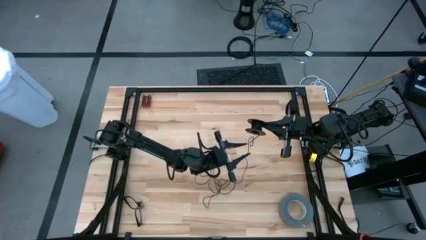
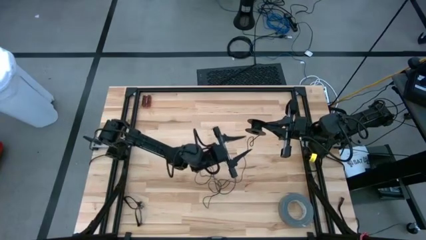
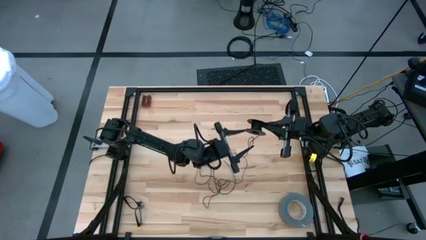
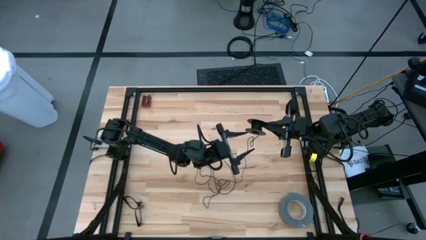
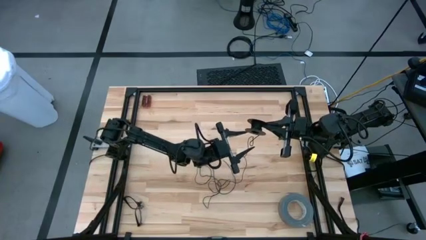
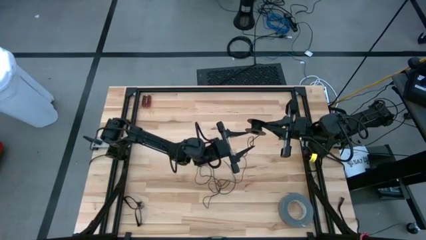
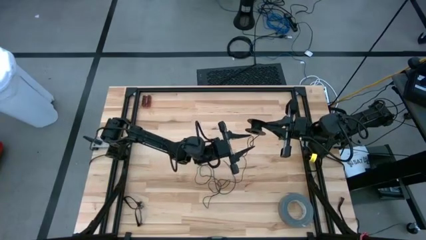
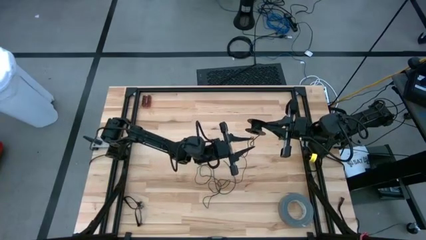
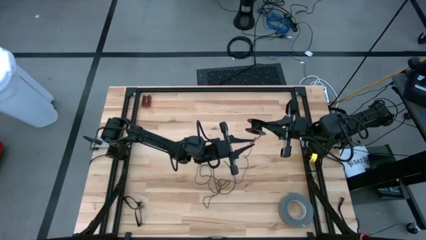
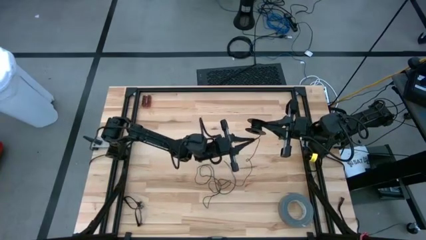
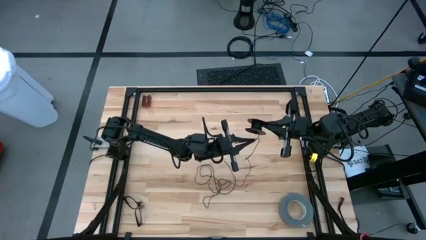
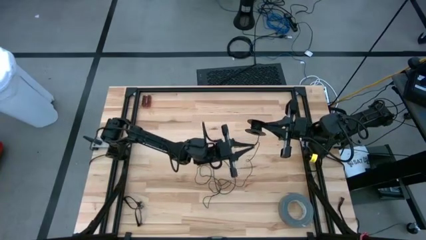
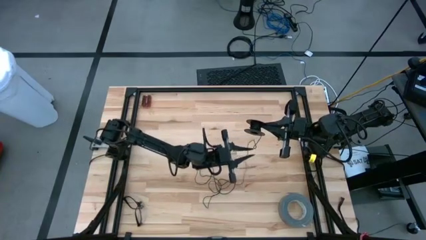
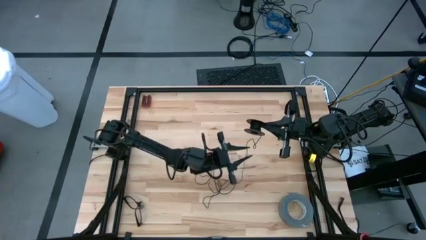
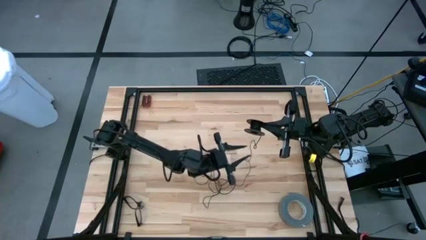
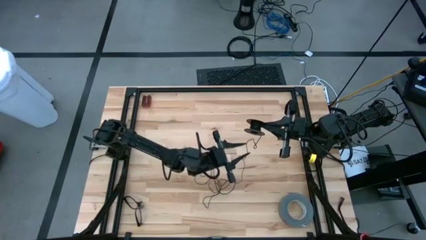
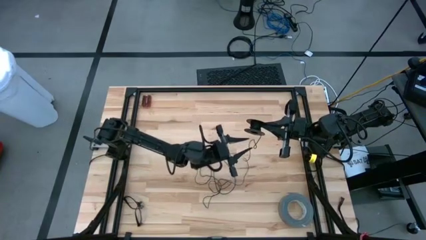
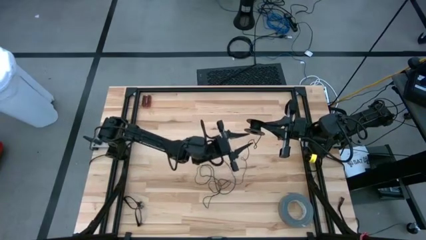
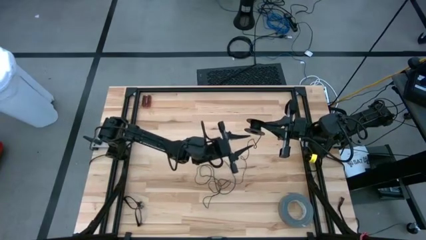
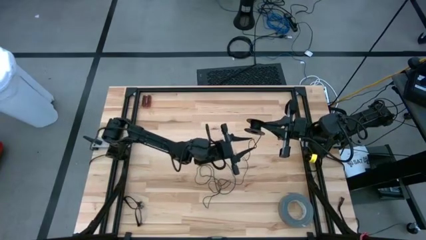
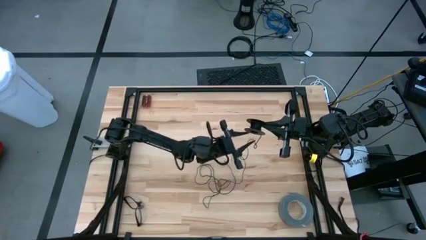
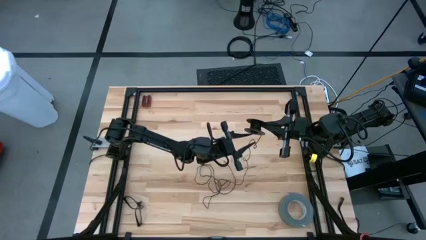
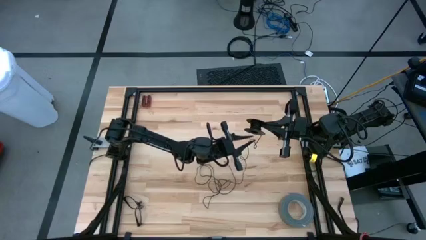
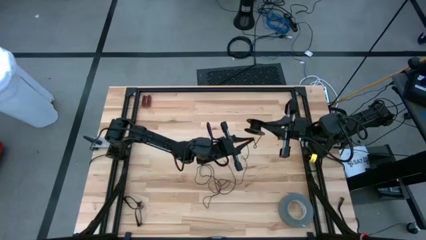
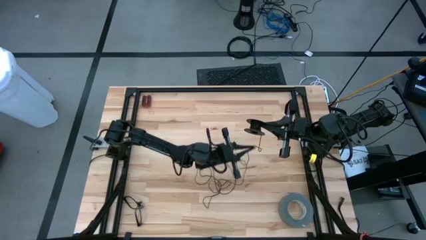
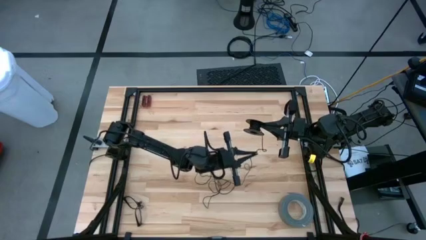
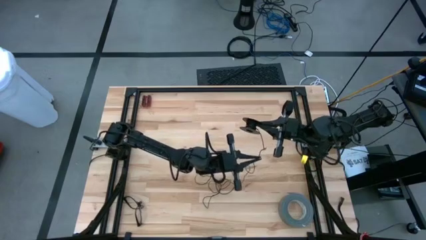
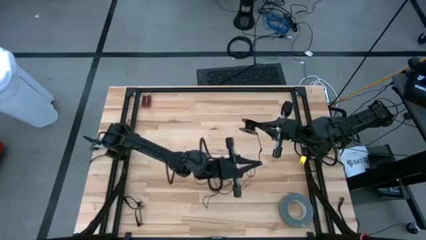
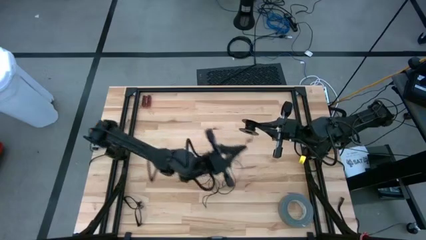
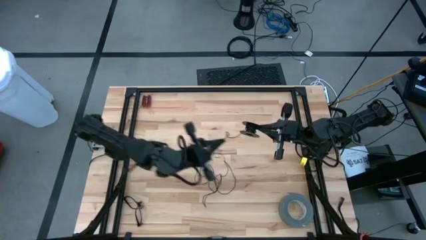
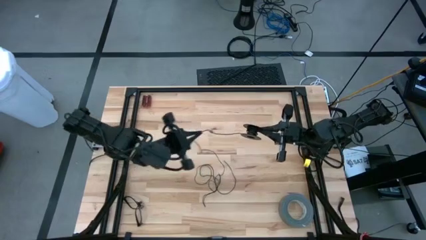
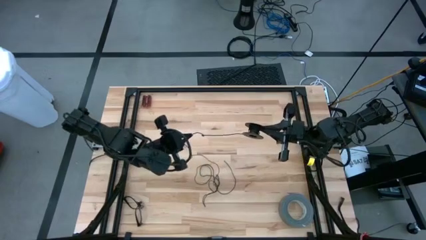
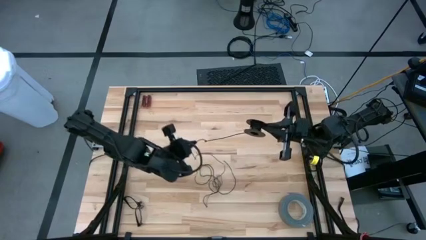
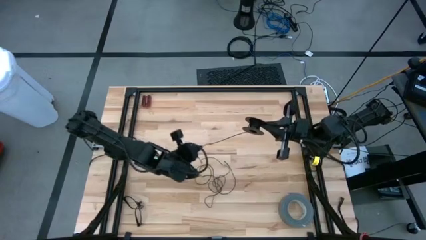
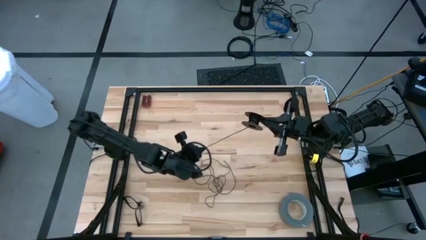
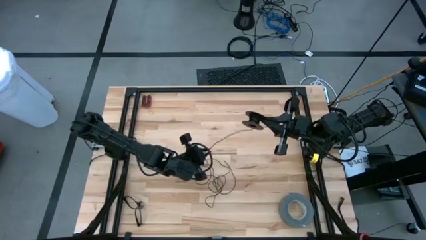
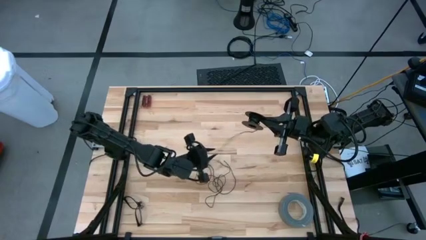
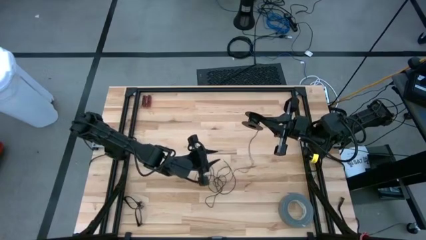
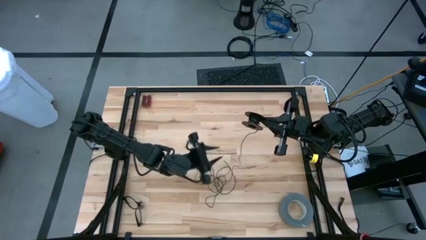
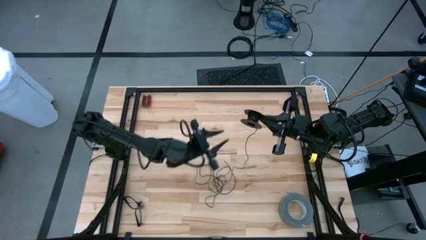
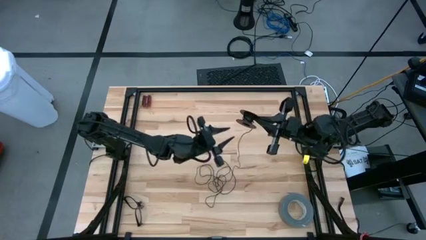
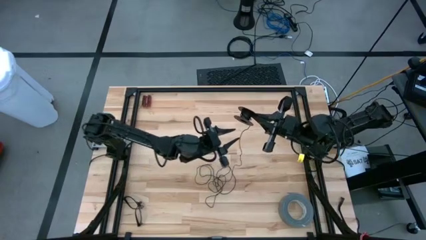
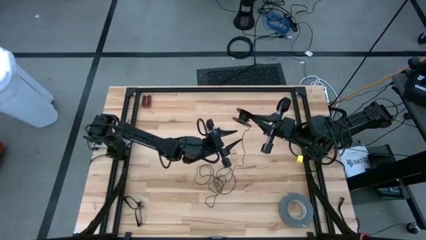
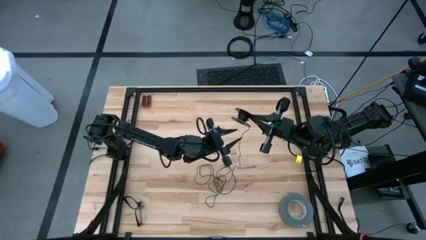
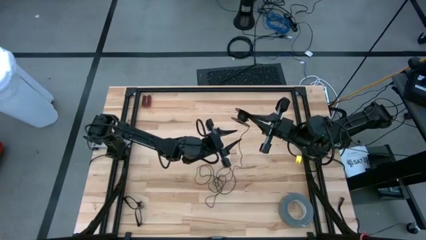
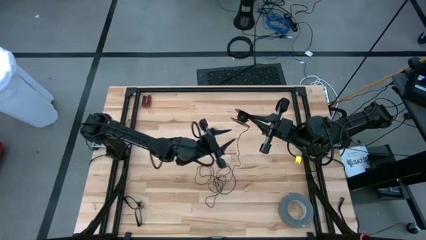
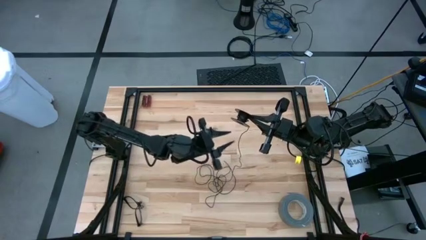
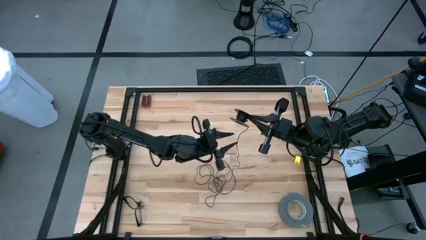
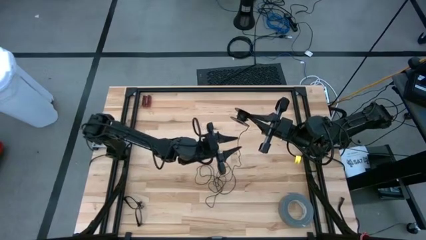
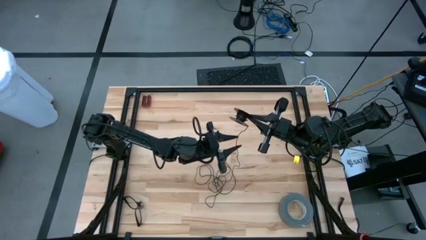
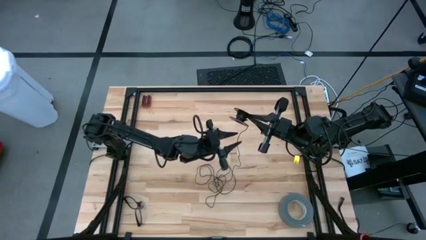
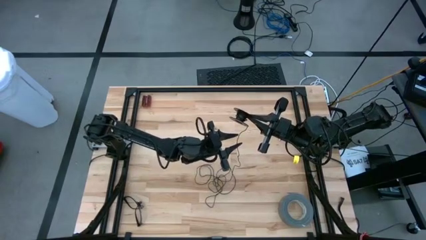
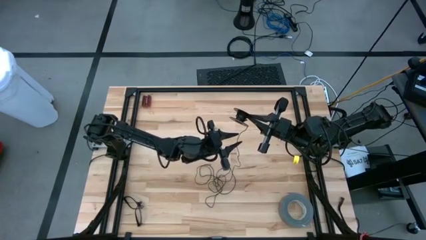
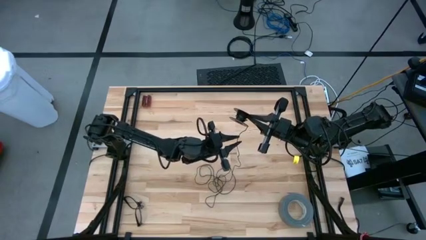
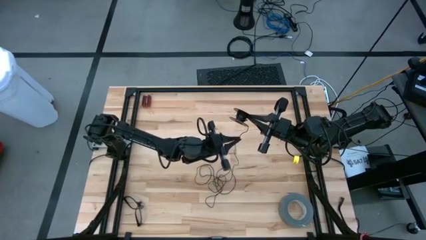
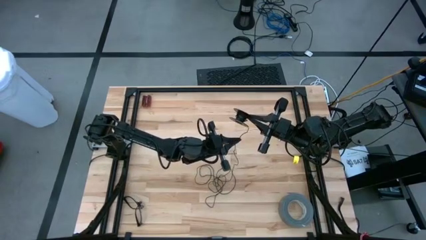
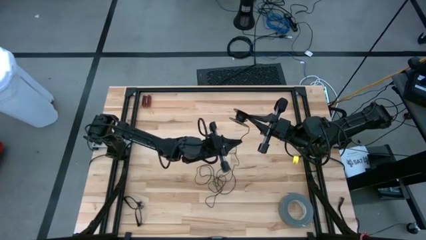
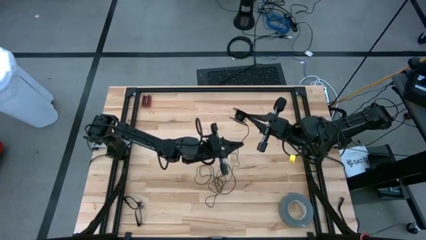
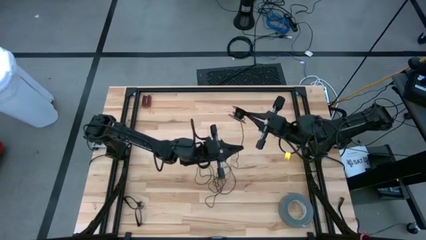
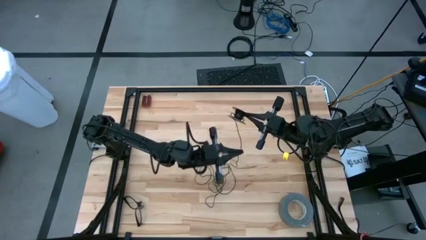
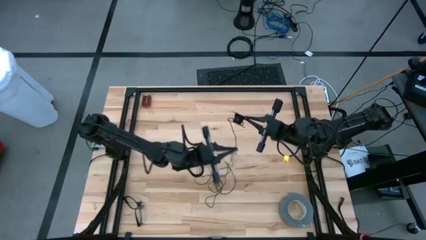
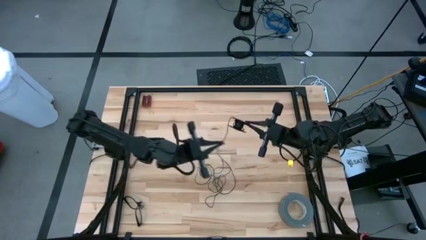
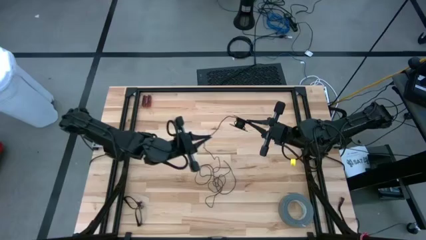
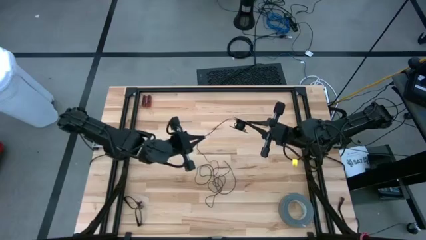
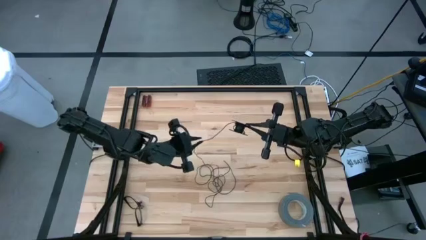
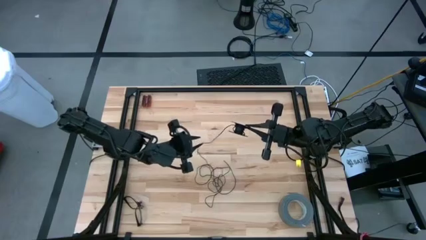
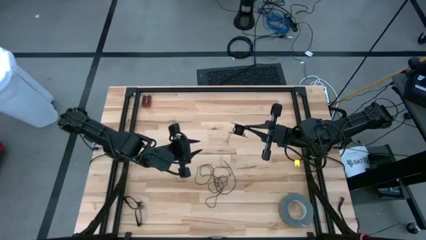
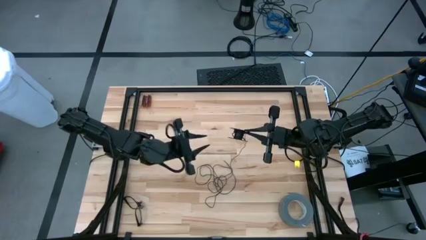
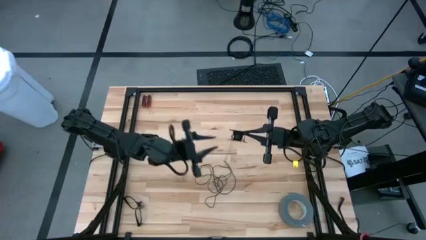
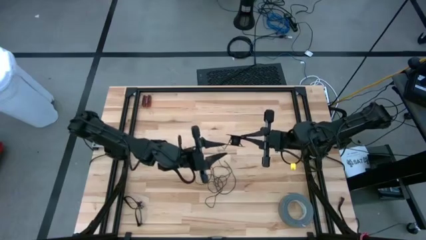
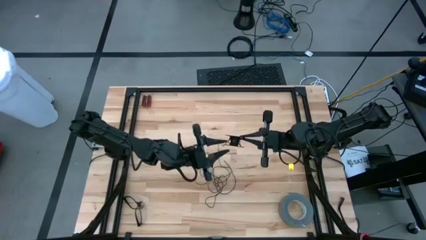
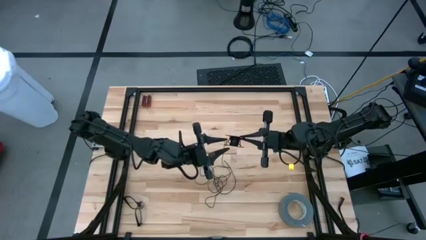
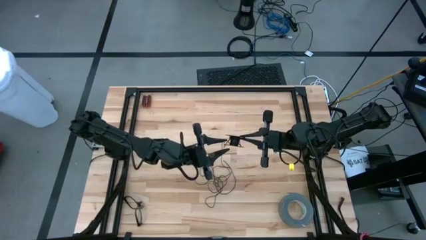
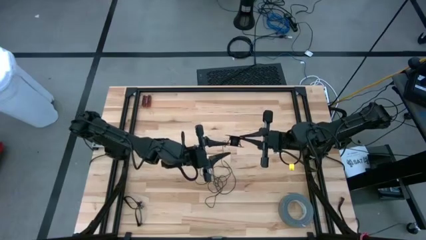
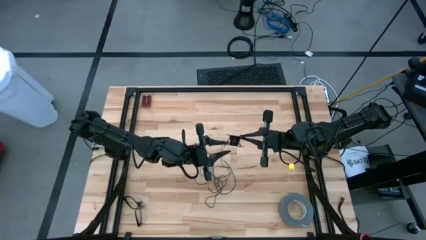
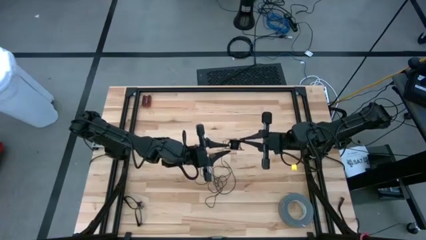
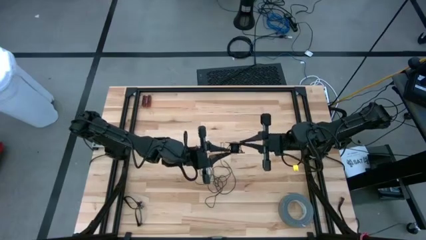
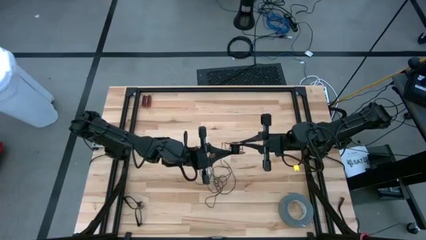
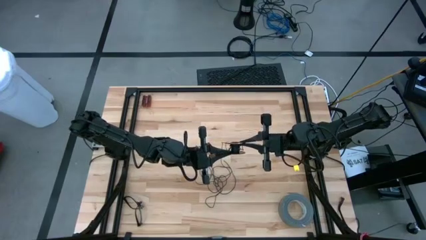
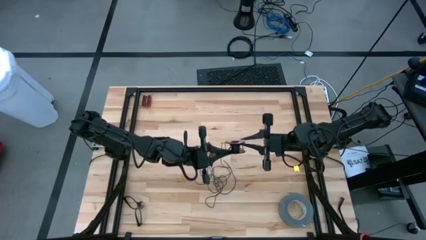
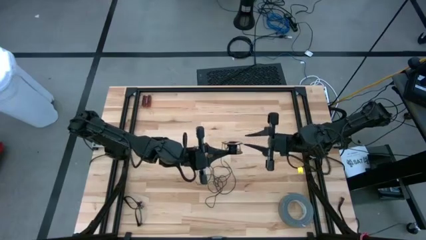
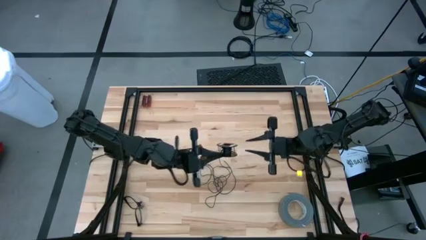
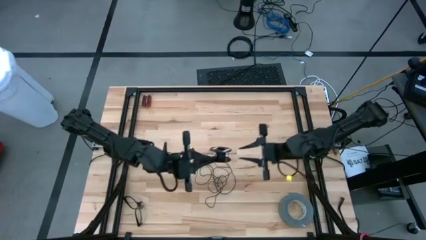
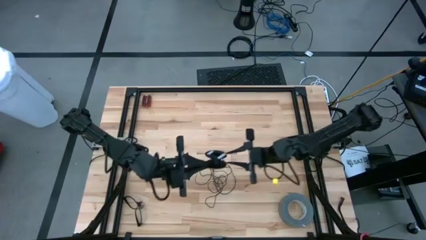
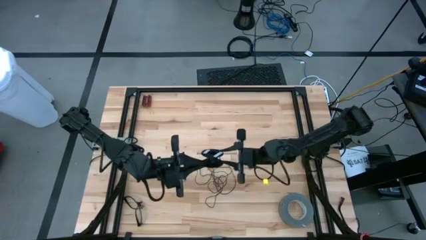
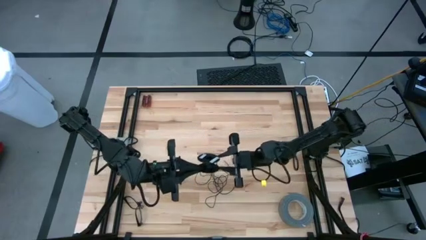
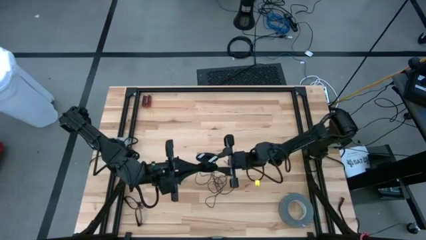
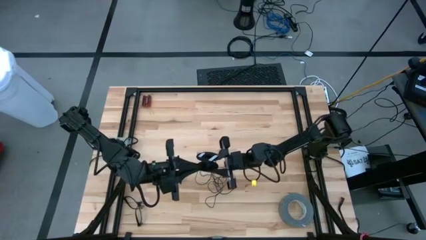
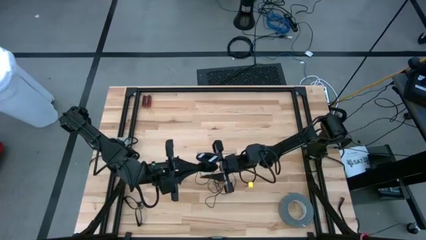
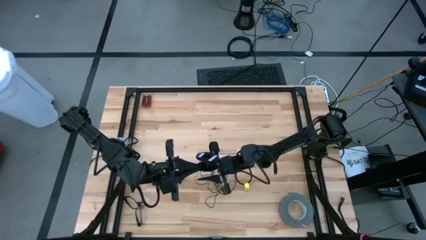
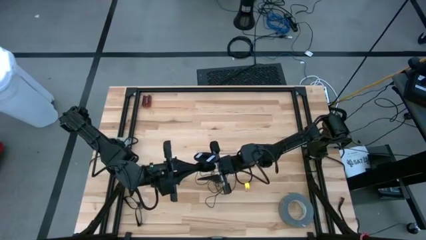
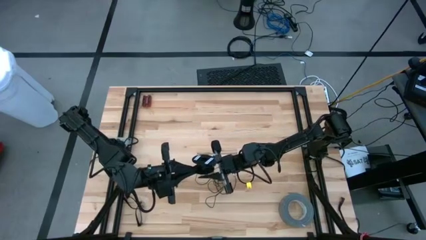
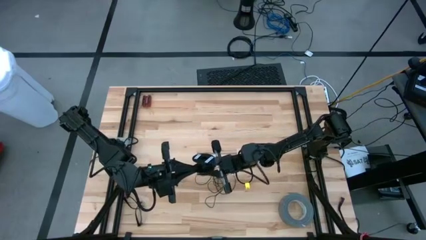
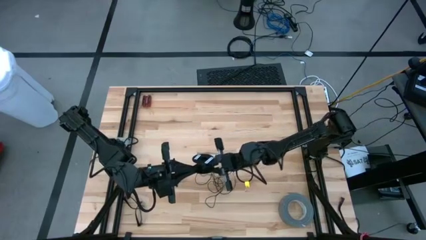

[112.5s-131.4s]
Task: Coil cords
Uncoil the black wire from the spool
